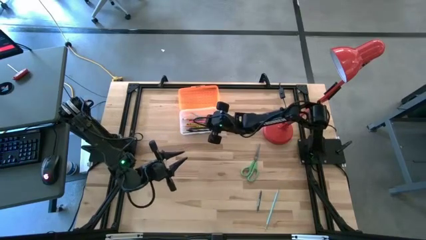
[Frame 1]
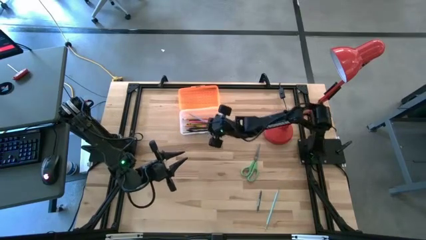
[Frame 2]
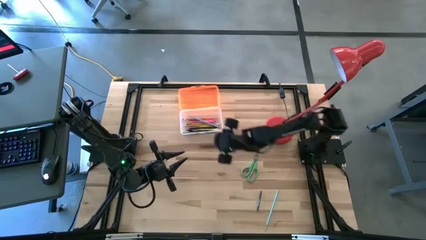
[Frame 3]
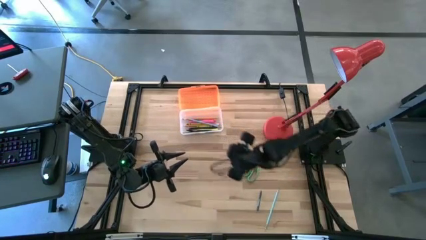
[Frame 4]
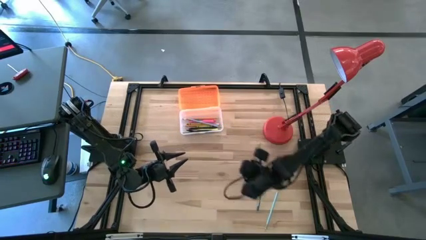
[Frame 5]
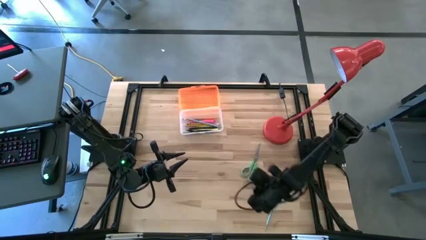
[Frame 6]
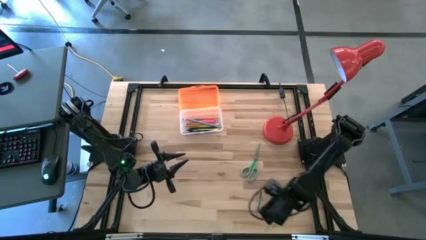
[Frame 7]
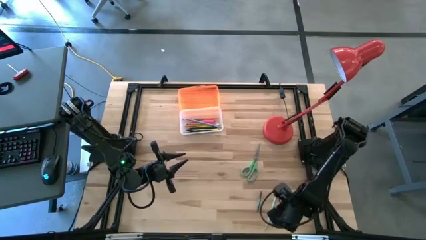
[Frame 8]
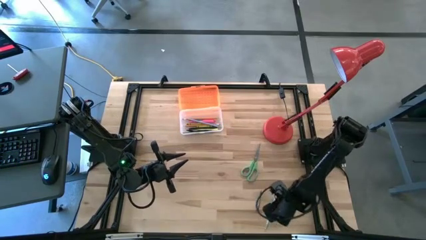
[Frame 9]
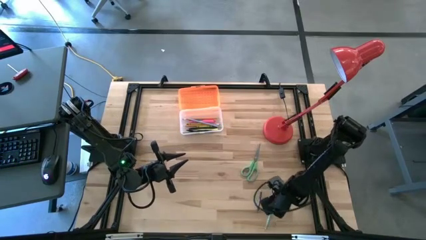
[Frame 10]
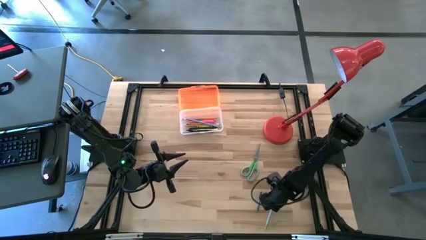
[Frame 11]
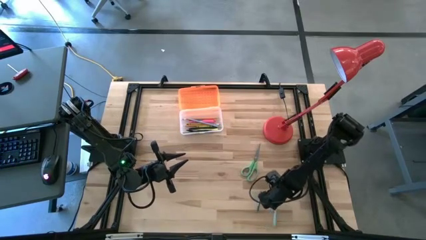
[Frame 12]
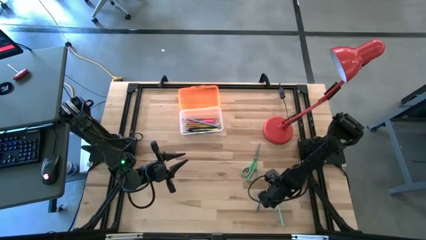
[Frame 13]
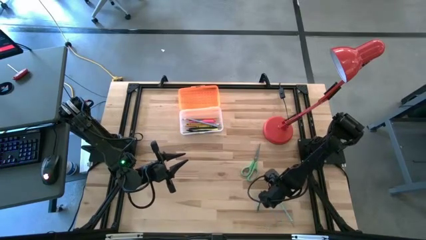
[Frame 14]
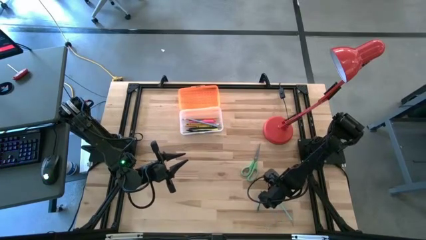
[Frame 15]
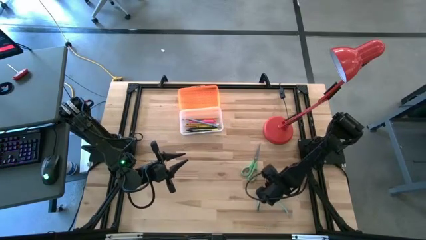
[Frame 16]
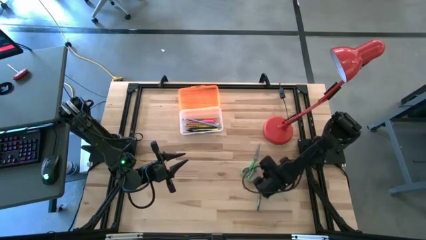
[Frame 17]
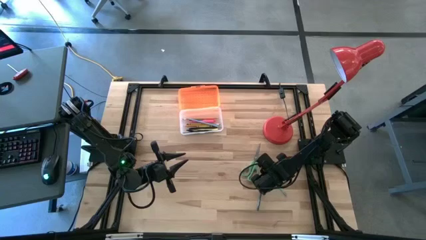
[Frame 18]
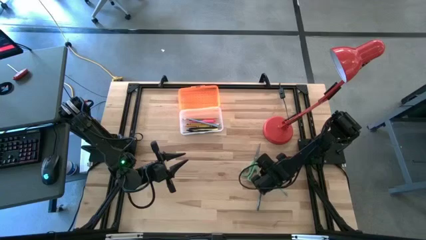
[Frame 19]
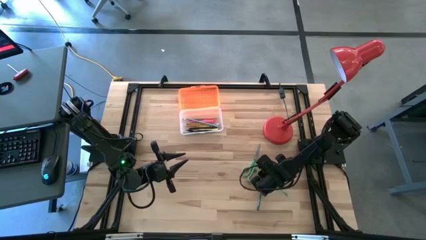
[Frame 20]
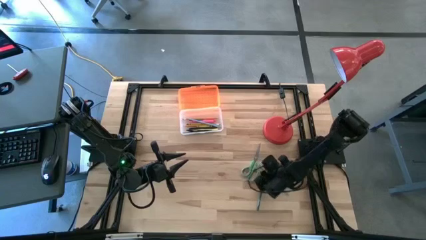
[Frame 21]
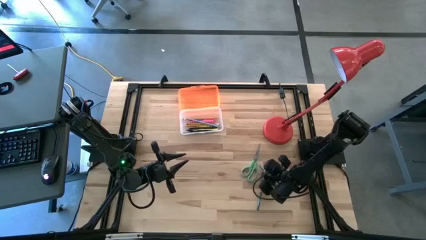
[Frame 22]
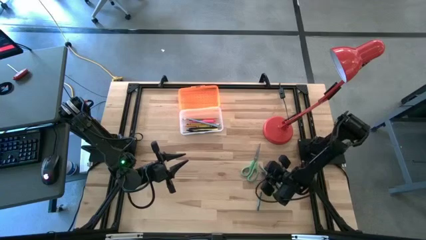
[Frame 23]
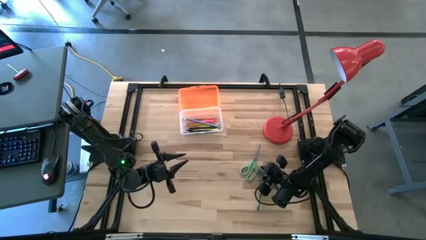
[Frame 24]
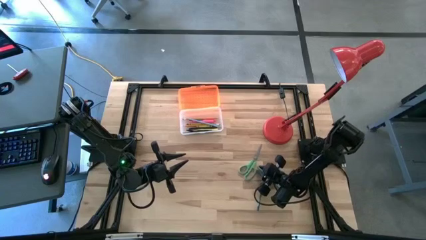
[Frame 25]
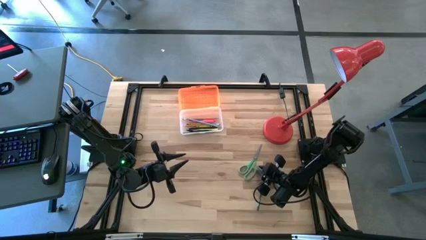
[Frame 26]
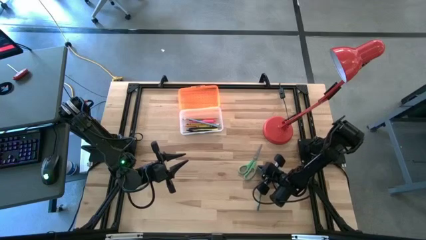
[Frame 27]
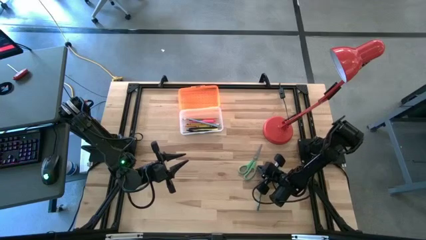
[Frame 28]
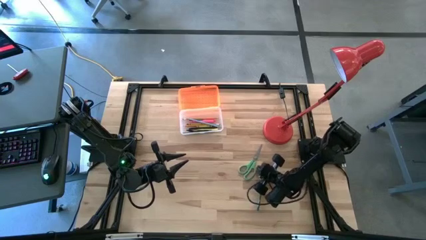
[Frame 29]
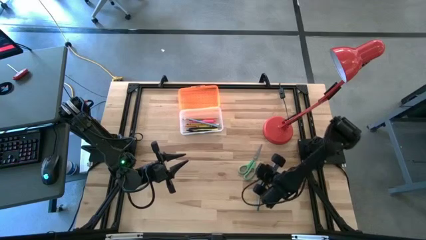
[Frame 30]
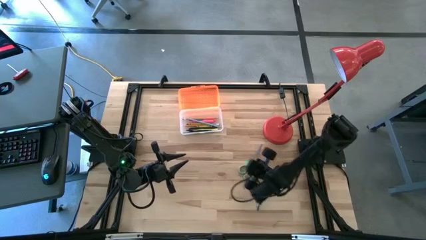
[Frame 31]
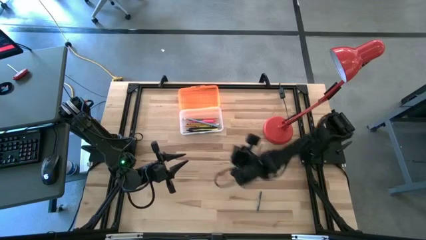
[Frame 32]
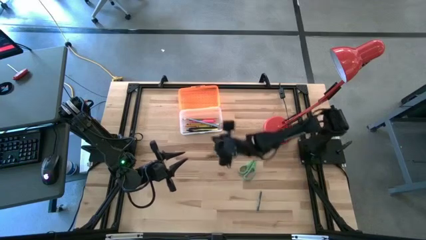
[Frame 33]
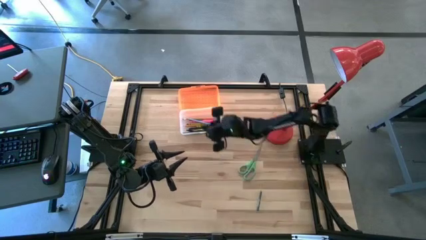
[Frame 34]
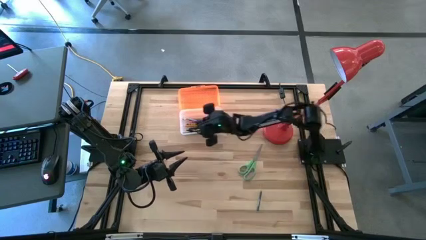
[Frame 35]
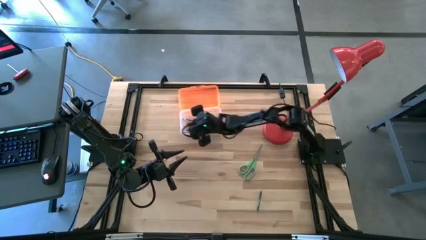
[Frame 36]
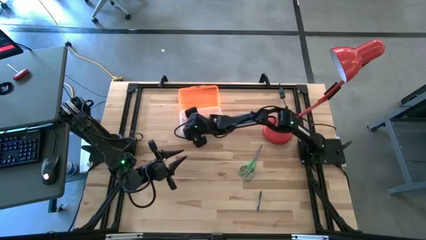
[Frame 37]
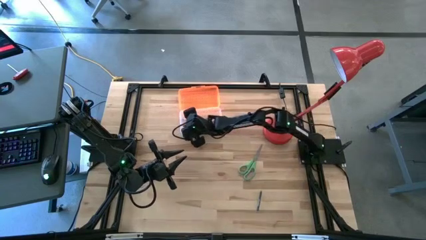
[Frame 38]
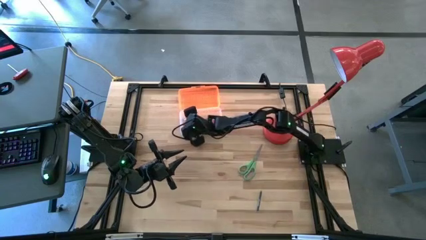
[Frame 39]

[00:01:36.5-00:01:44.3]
Task: Pick & place school supplies into a supply box
Put the blue pencil into the orange supply box

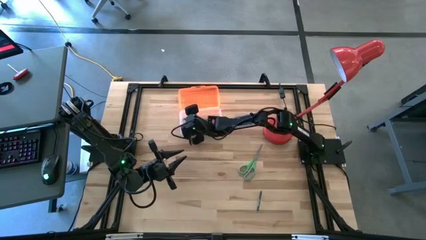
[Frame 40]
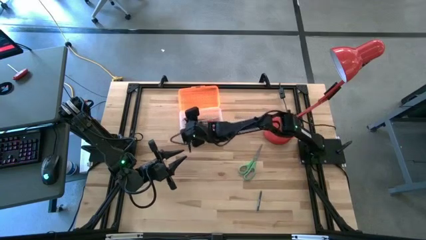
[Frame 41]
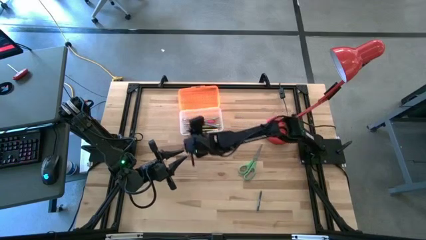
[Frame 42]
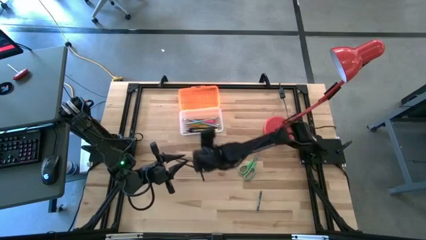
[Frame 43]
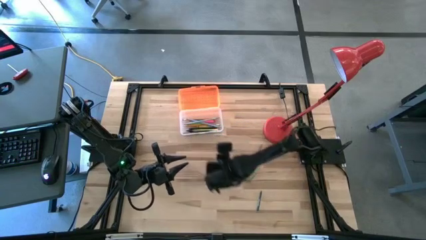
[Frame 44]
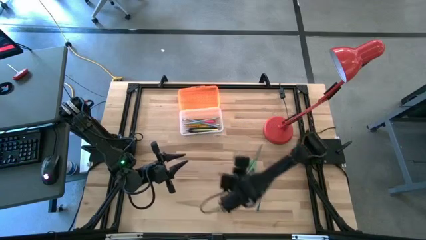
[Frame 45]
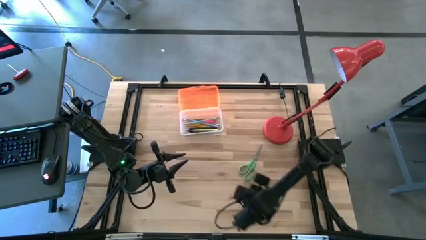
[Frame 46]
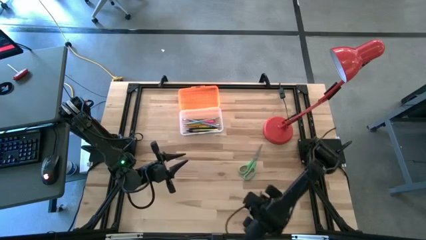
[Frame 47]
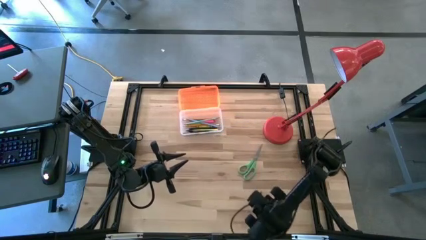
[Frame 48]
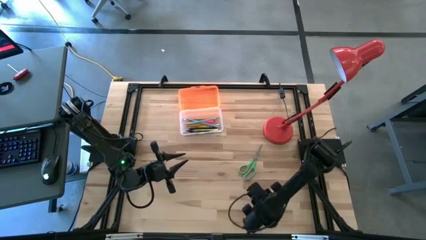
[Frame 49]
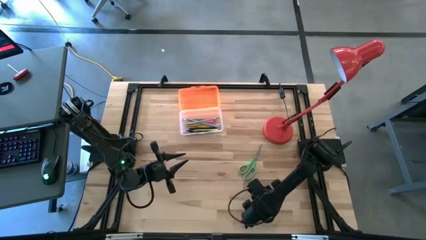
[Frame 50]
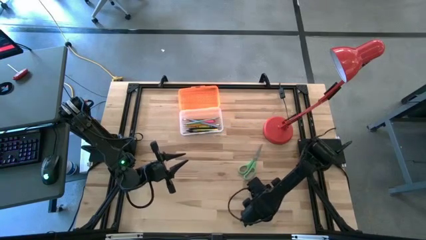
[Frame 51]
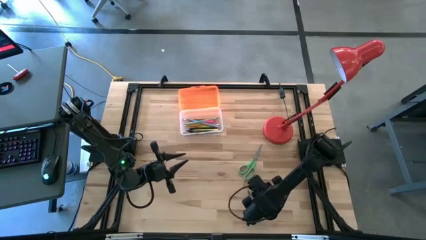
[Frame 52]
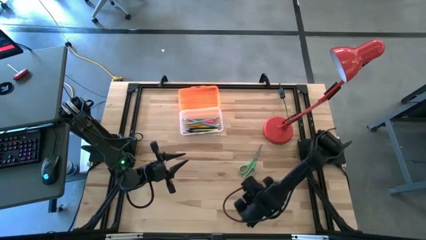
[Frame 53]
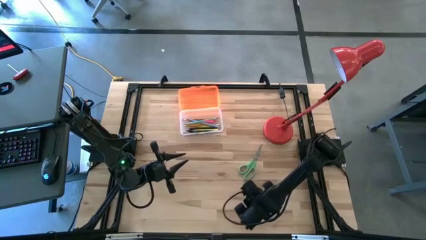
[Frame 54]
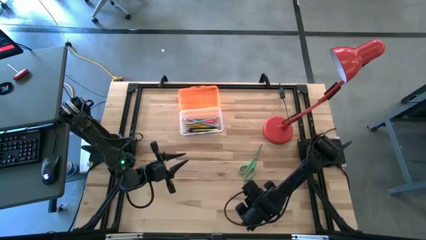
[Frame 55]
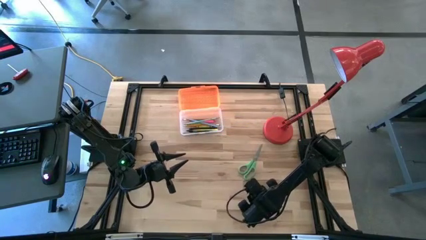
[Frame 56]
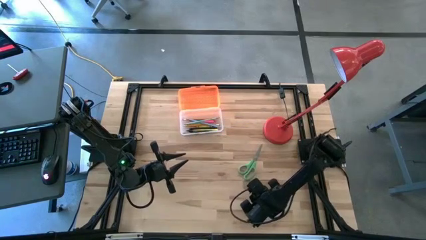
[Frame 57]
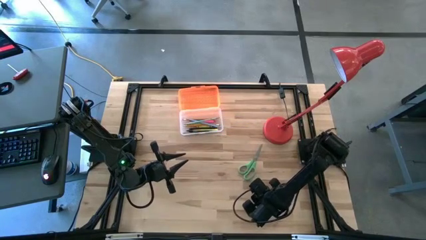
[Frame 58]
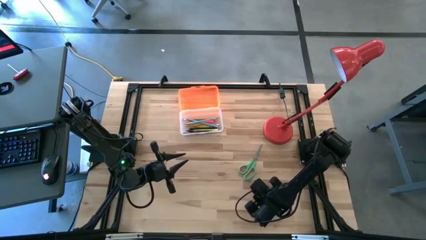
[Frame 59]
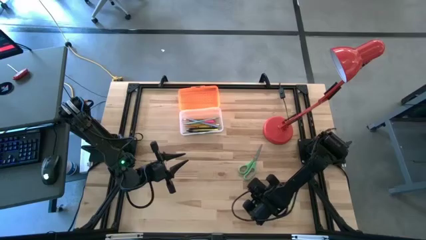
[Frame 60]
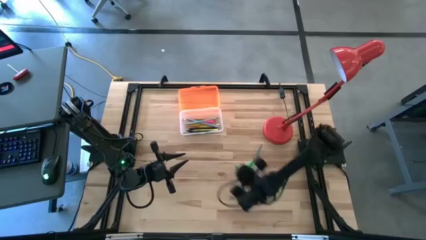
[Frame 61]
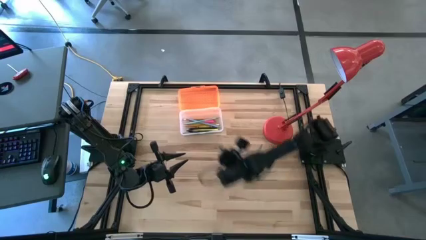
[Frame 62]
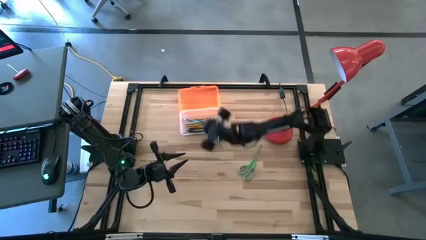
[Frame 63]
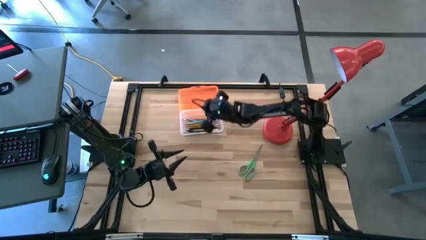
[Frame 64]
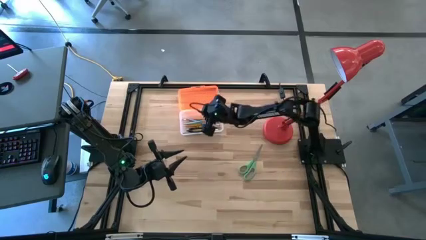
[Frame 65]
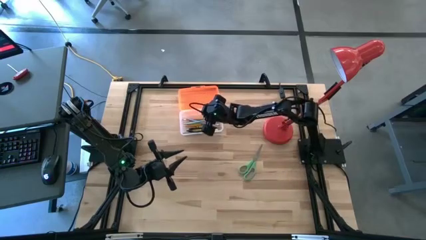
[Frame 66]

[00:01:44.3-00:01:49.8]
Put the dark green crayon into the orange supply box

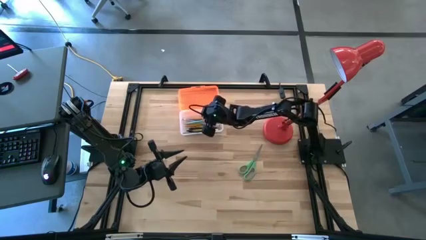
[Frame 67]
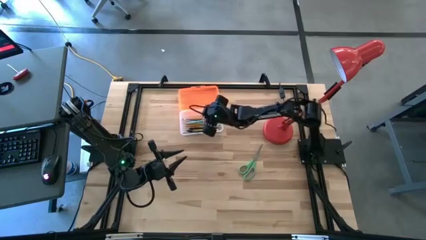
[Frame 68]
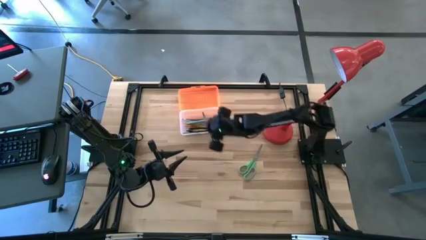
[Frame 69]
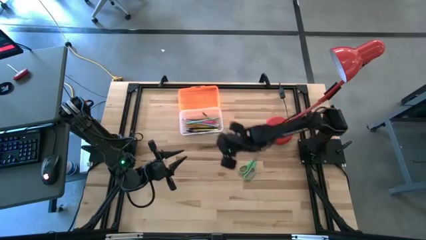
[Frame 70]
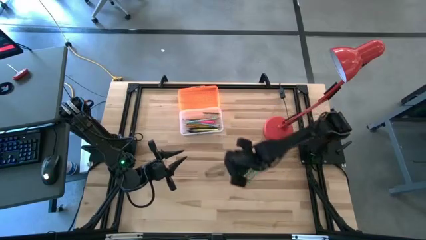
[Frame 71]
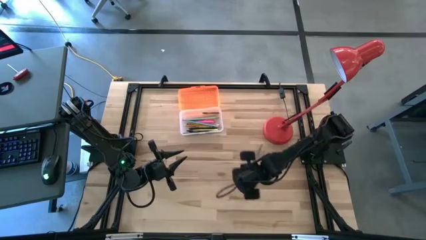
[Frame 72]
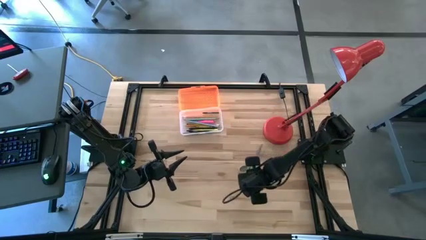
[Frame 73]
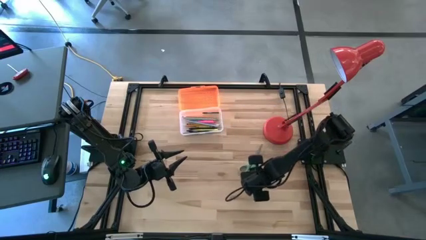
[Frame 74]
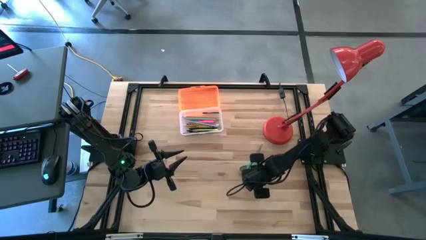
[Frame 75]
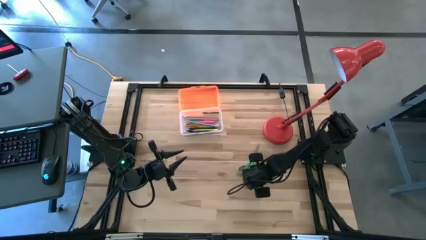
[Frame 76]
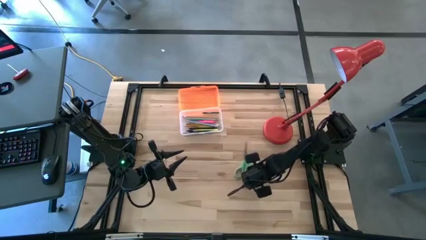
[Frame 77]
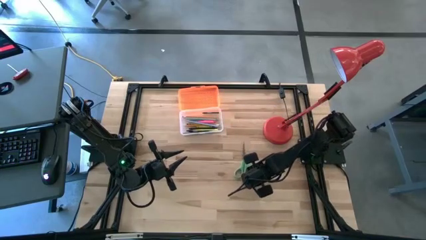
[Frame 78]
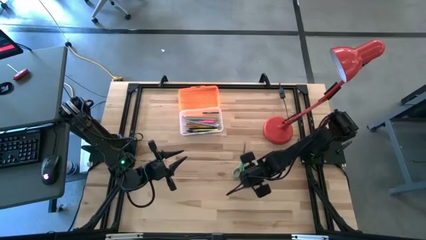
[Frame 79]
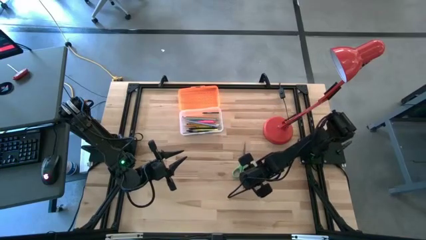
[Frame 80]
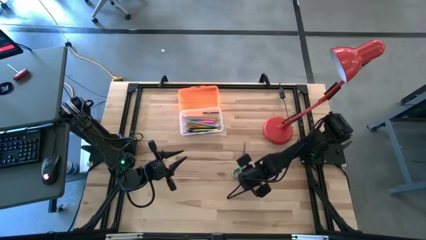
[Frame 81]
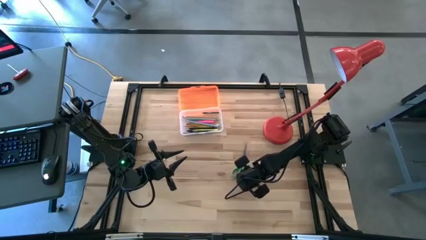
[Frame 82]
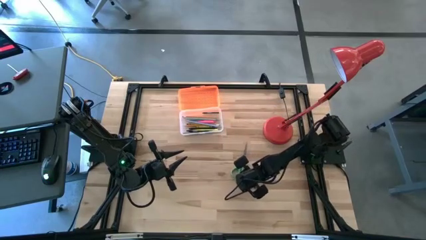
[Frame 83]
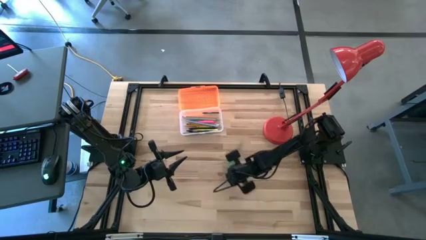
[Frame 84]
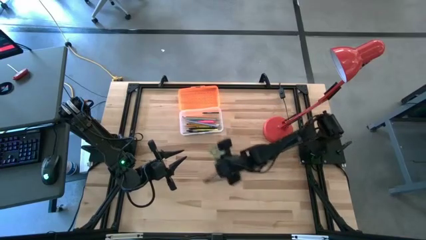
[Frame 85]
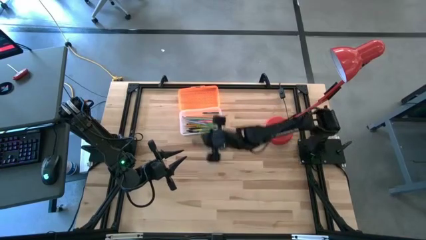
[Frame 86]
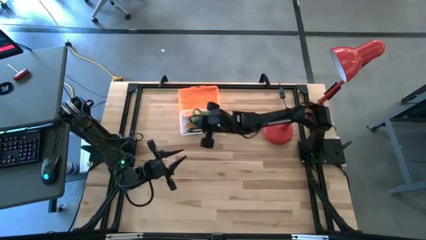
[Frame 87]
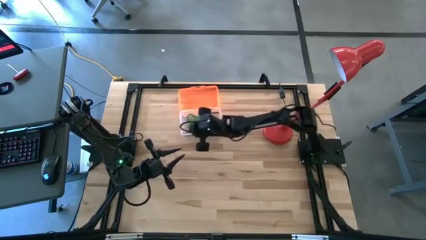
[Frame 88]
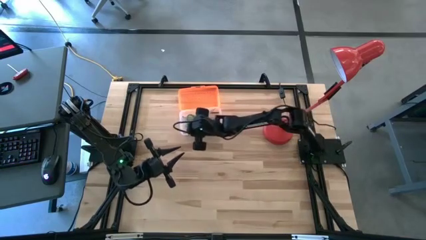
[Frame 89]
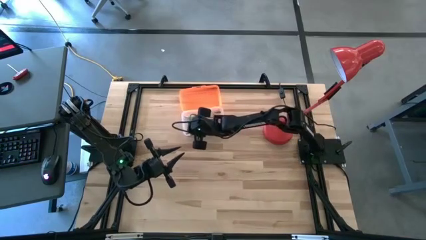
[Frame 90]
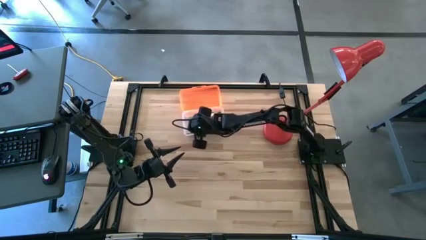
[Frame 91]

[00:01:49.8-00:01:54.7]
Put the green scissors into the orange supply box
